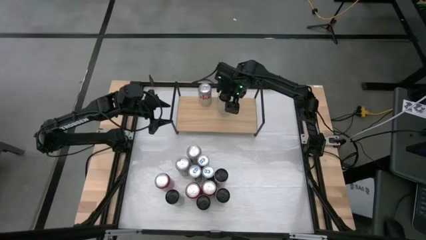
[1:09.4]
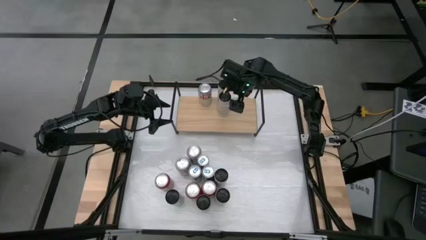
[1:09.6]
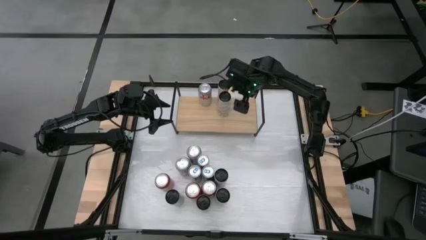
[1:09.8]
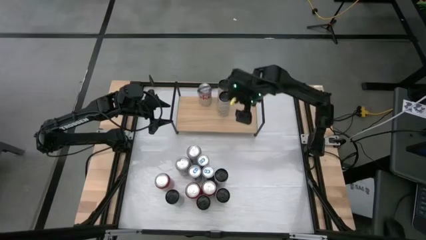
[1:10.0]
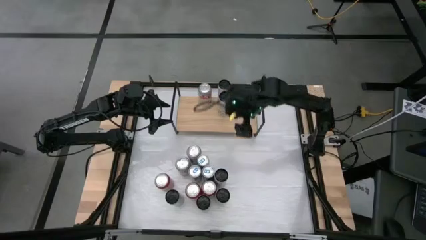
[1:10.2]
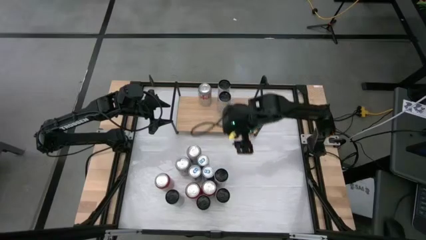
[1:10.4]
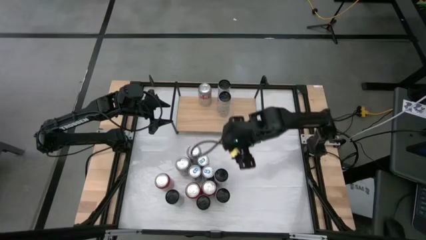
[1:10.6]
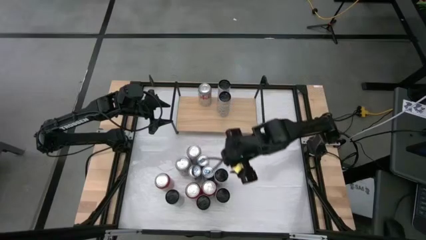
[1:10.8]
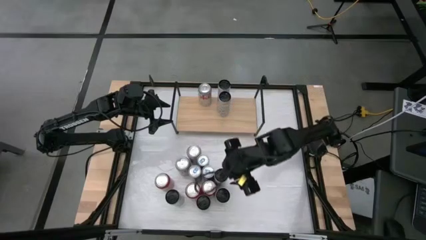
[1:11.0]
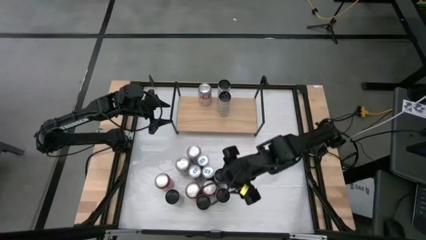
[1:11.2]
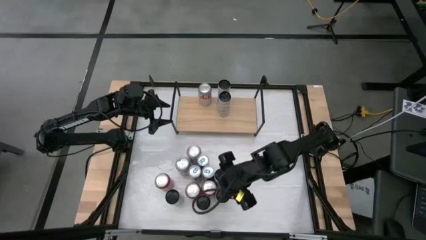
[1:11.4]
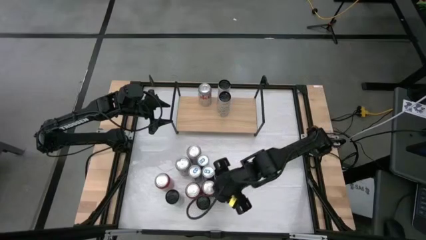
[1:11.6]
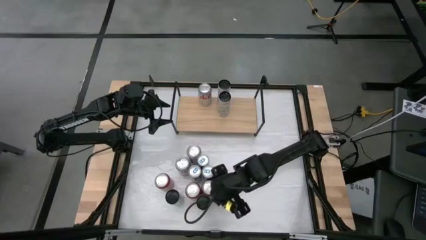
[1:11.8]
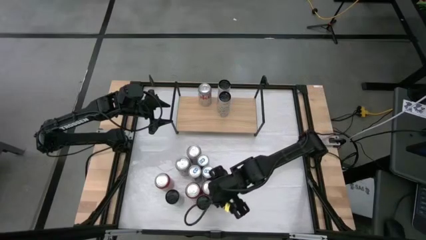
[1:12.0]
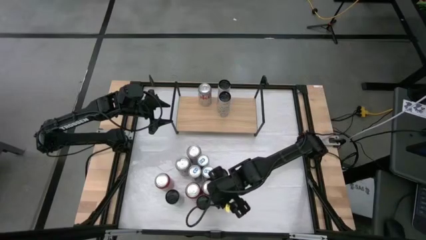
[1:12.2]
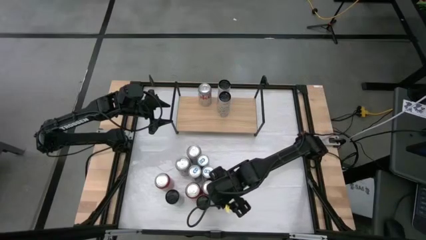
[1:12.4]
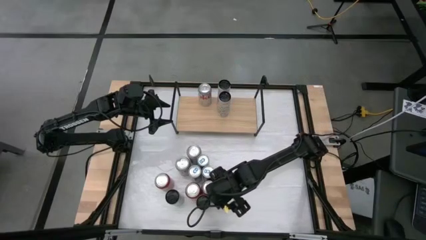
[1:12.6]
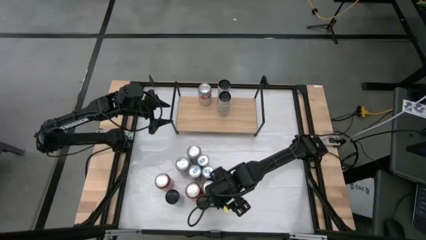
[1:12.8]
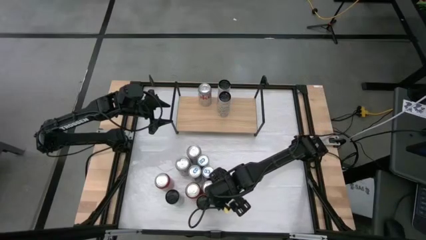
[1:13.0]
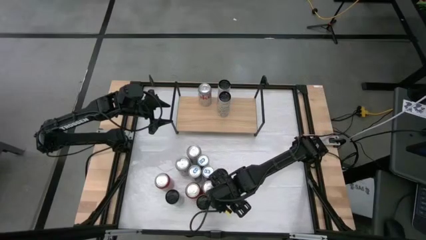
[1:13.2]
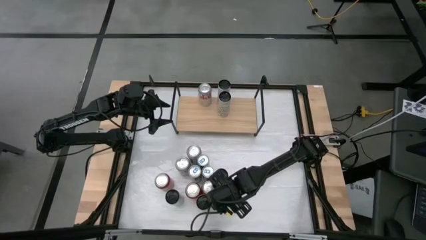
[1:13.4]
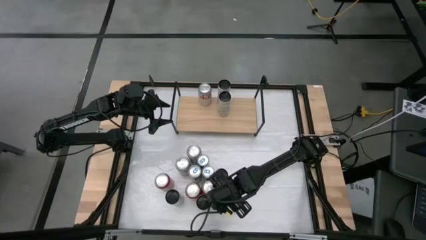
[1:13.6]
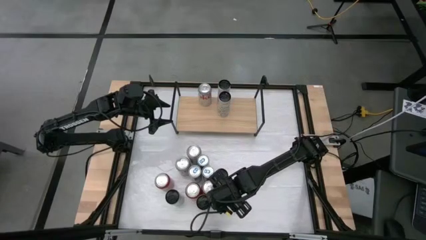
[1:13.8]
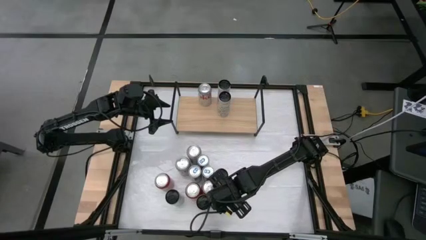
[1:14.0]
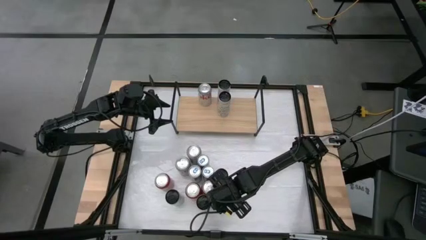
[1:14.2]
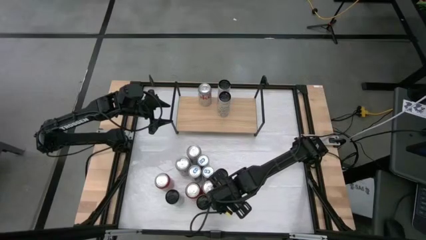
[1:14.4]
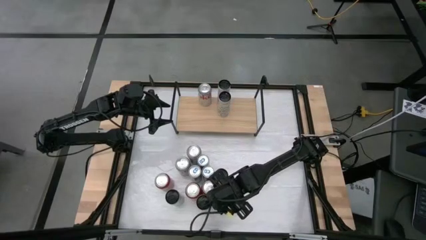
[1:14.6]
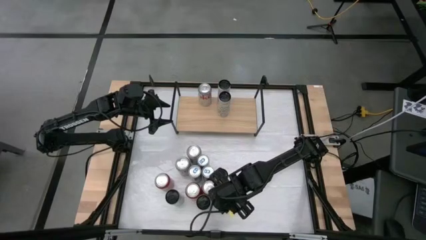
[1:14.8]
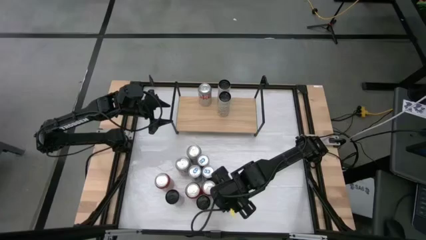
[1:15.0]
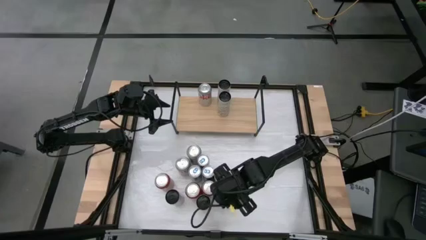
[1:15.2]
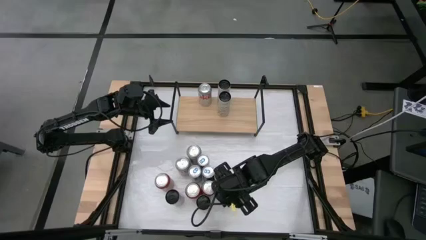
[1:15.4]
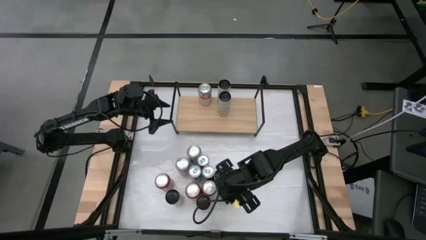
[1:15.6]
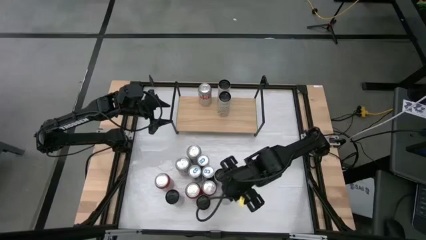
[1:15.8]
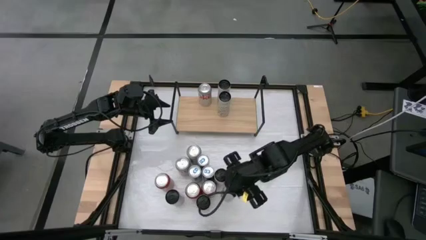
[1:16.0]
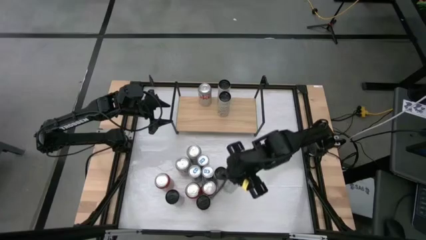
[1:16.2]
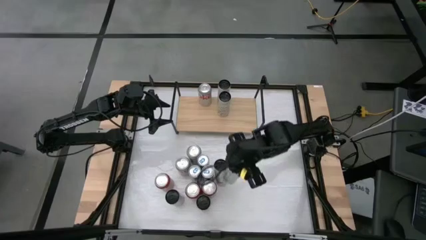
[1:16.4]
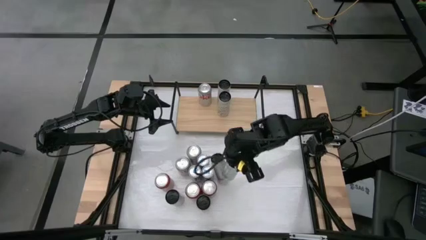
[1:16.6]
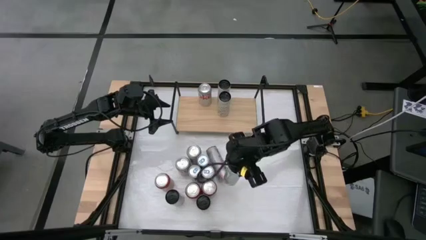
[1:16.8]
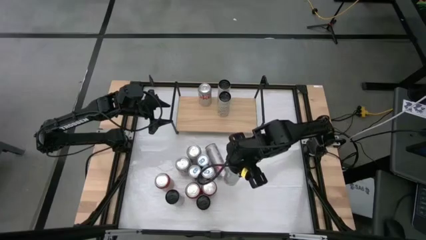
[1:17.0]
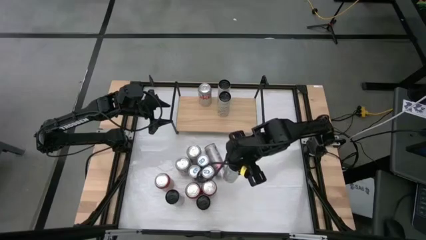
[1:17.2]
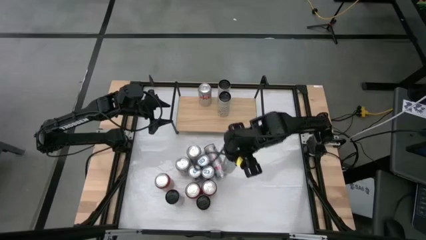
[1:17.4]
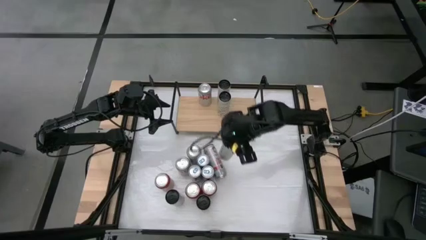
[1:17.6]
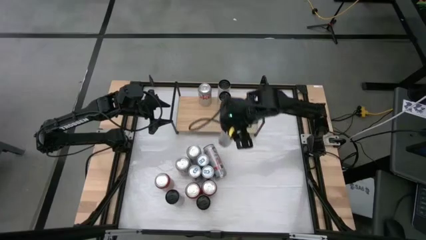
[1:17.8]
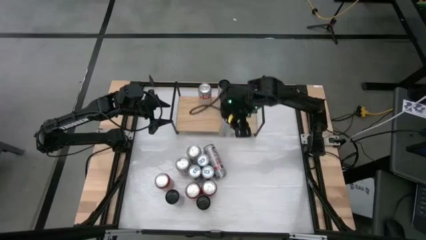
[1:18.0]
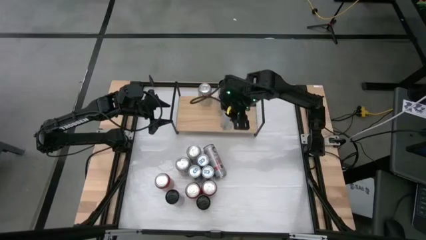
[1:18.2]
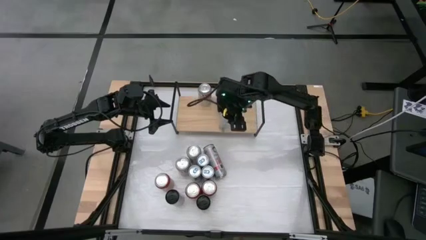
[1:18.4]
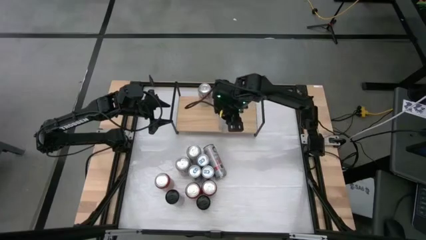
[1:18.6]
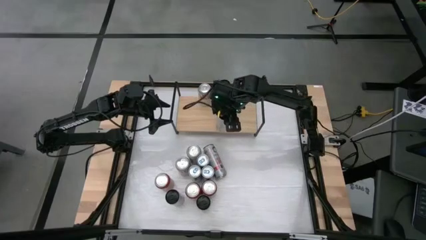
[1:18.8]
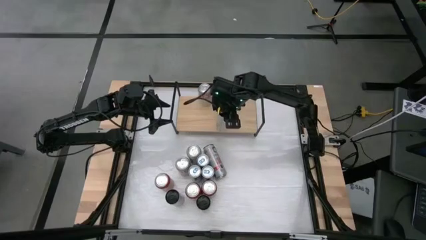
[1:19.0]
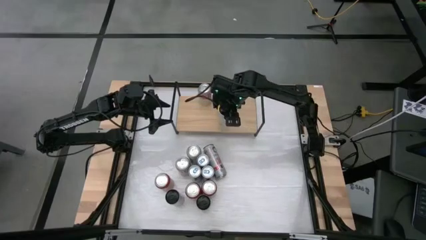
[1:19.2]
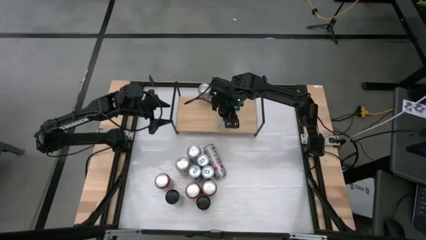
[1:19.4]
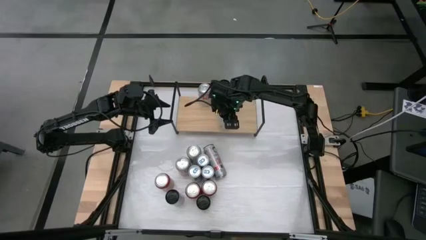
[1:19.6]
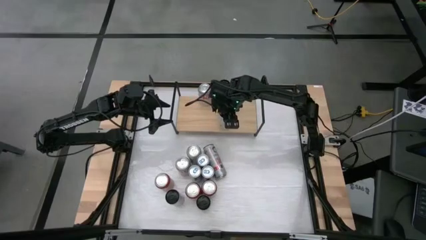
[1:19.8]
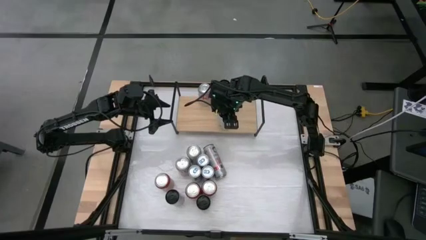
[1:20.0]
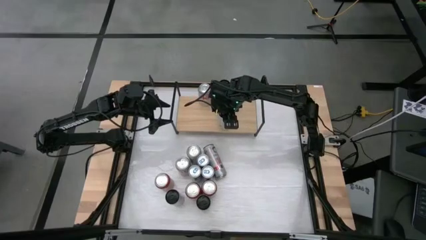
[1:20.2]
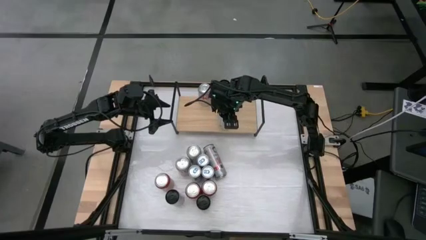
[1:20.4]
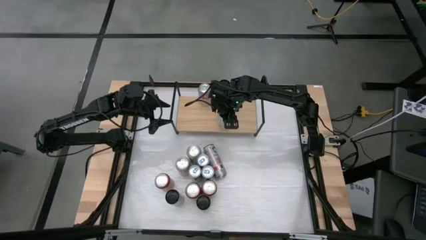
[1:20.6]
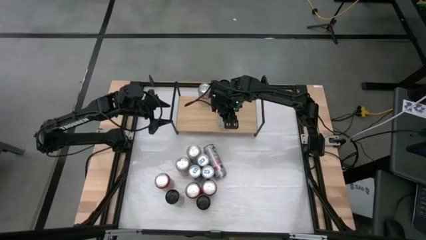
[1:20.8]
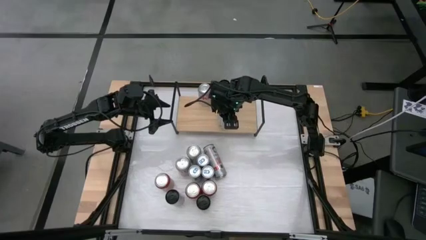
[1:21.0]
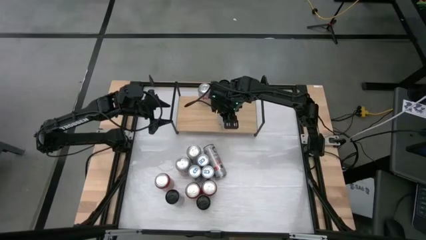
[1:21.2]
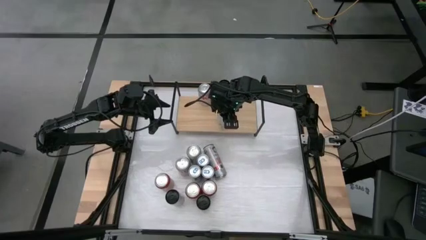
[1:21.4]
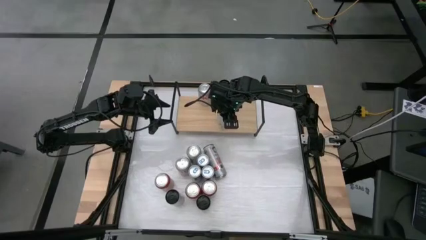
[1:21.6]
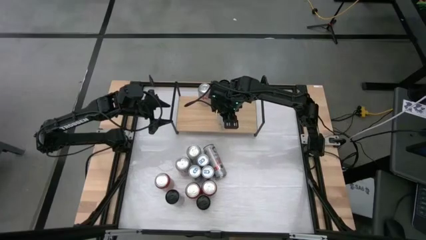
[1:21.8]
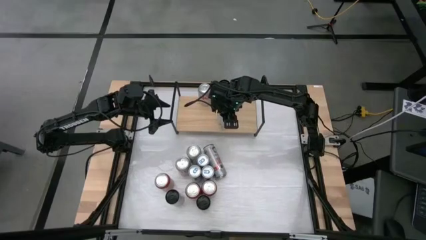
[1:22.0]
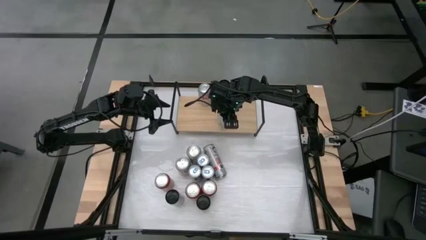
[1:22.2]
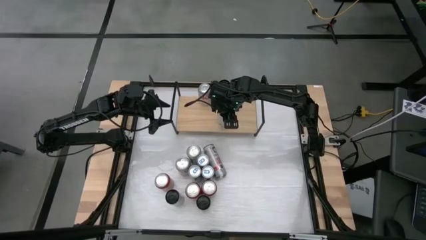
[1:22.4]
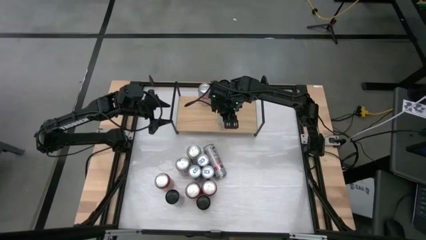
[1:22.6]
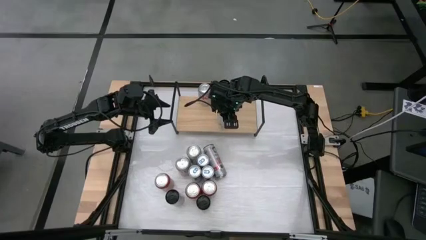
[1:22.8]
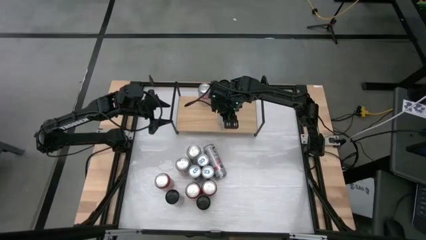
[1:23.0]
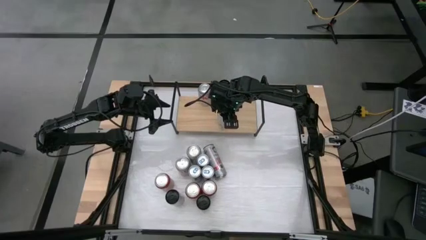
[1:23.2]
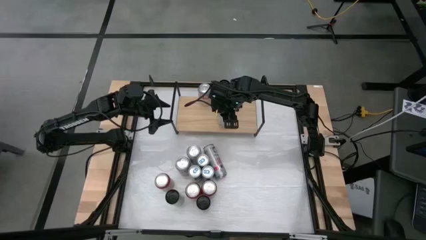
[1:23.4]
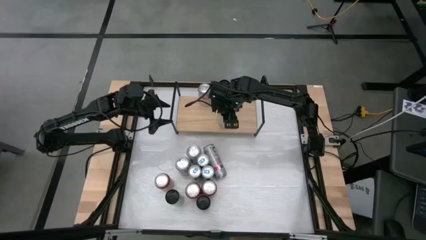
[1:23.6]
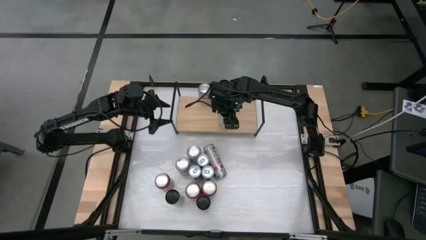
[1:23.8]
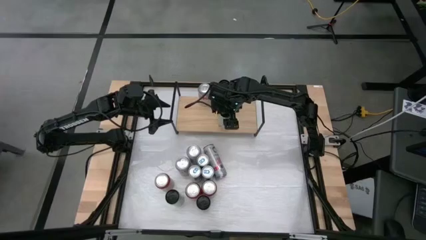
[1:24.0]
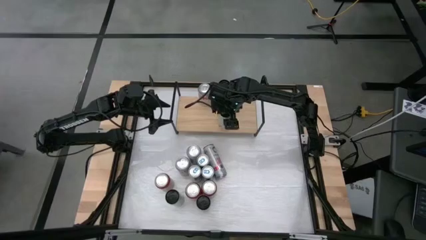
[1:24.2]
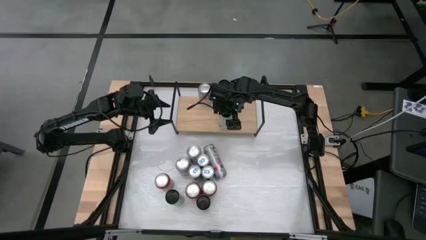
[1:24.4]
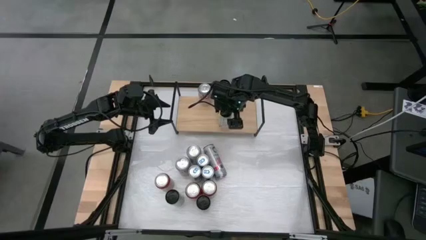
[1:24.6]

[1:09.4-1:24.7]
Task: Place canned beverage on shelf
Put the white yellow soda can onto the shelf aligned with the other white yellow soda cans

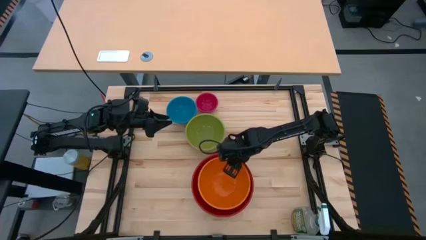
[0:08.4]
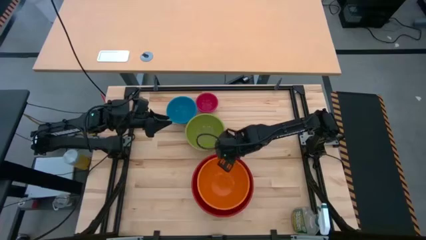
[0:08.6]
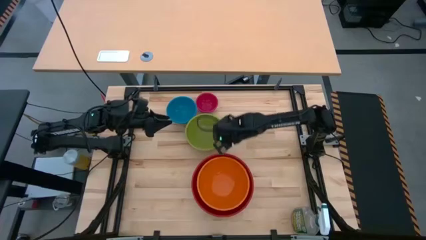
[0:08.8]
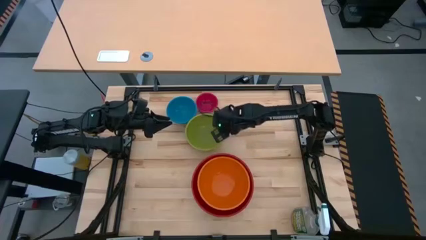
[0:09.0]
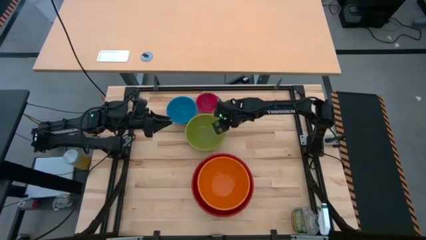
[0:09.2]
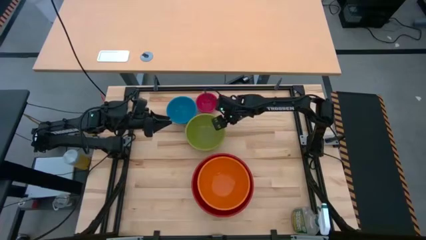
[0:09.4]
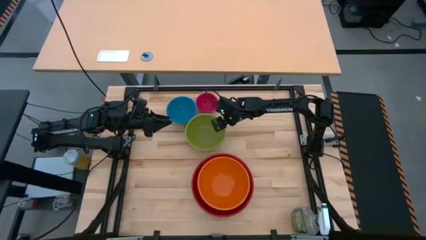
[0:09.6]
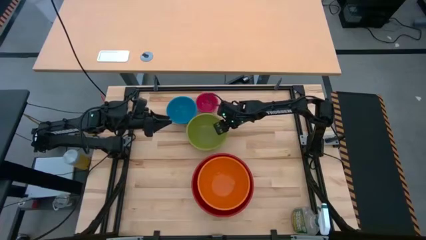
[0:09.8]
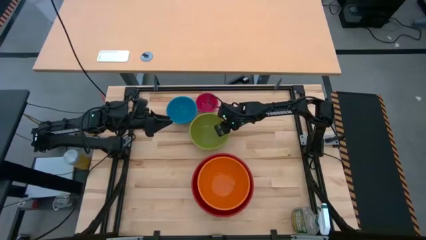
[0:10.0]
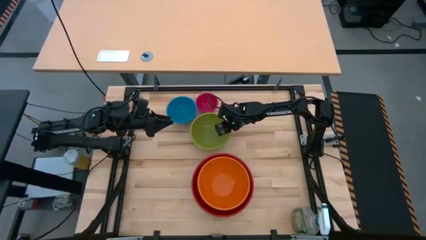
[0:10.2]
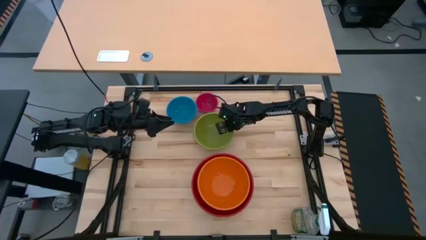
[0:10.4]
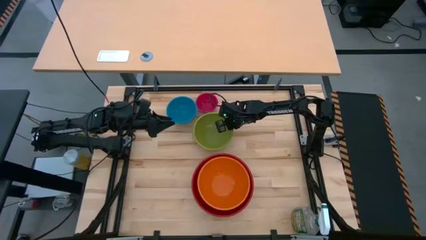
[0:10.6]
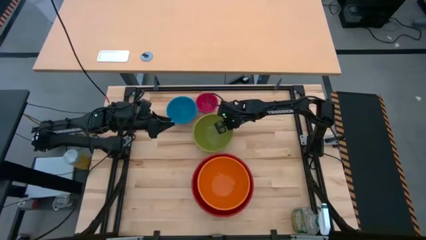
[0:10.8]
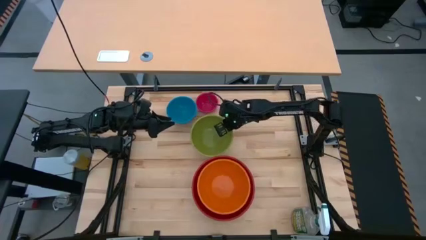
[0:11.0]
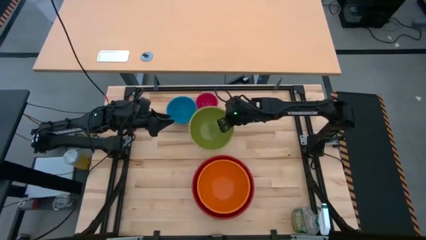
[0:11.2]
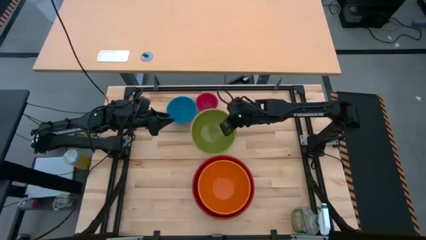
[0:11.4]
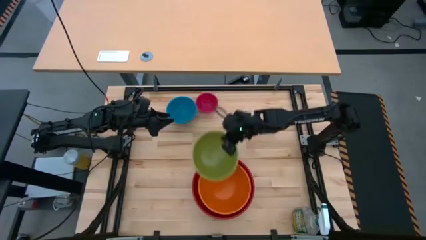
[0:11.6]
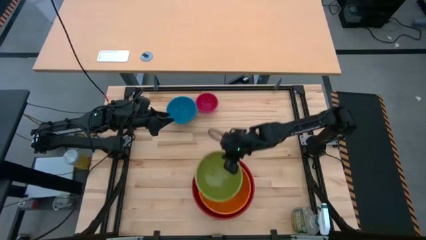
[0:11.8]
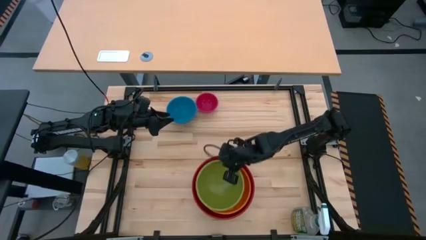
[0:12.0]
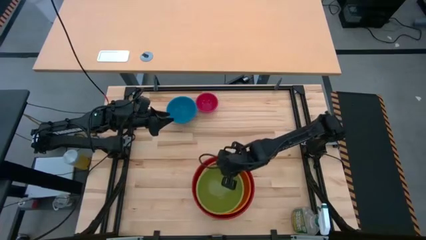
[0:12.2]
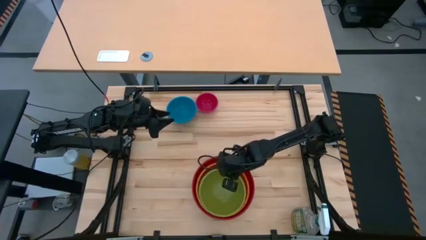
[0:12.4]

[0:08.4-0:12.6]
Task: Nest bowls inside each other by size order
Stack the green bowl on top of the orange bowl
